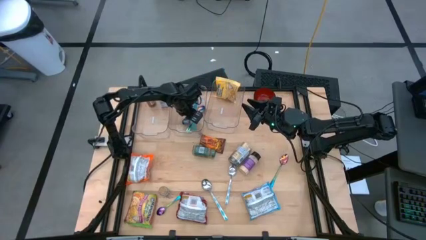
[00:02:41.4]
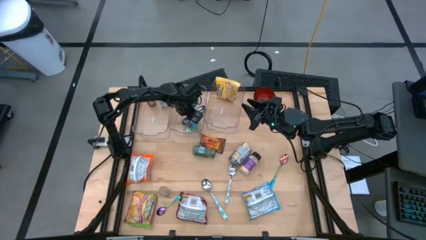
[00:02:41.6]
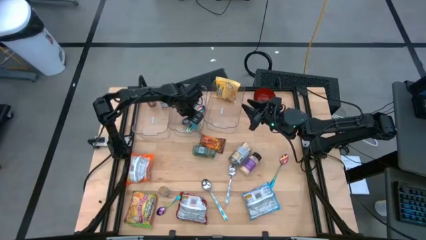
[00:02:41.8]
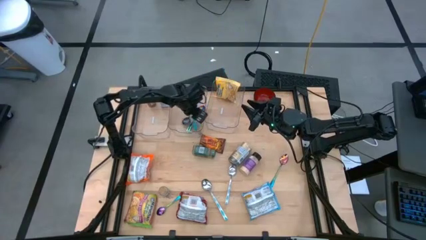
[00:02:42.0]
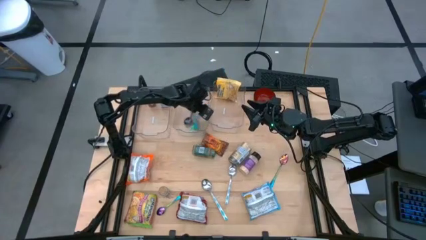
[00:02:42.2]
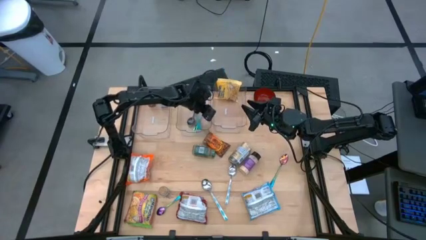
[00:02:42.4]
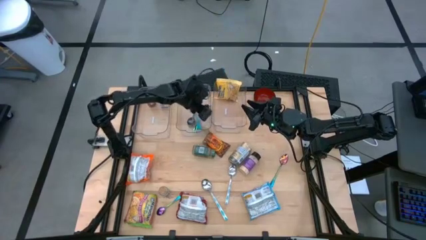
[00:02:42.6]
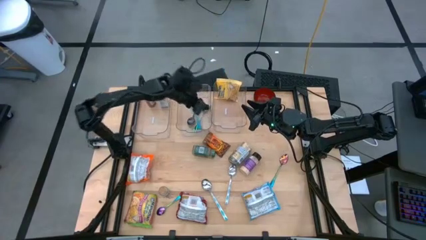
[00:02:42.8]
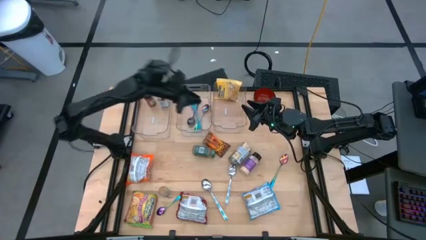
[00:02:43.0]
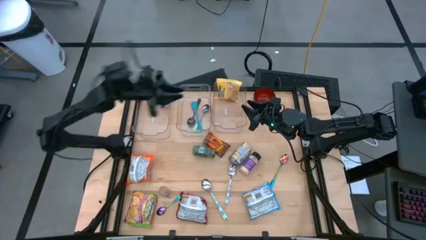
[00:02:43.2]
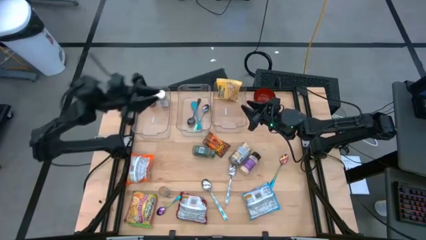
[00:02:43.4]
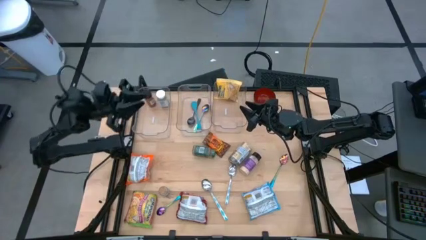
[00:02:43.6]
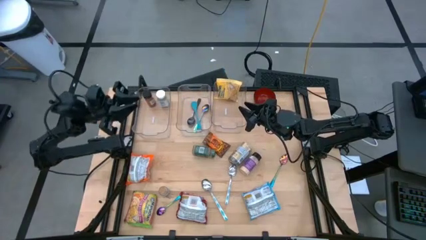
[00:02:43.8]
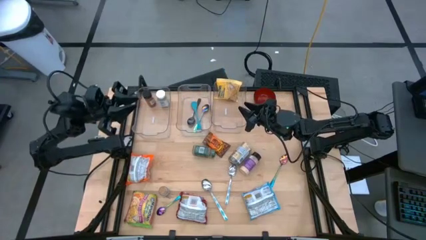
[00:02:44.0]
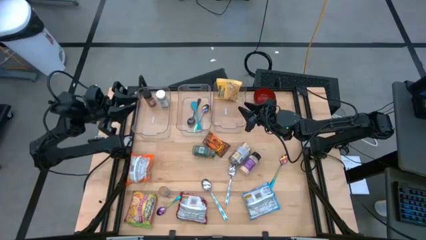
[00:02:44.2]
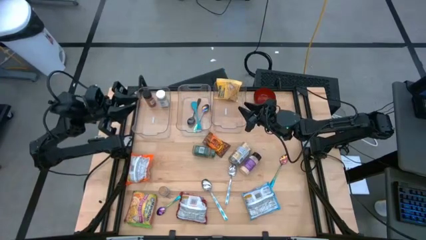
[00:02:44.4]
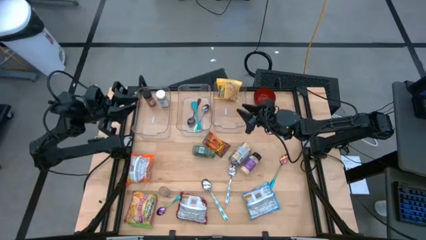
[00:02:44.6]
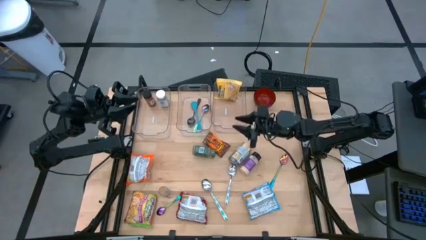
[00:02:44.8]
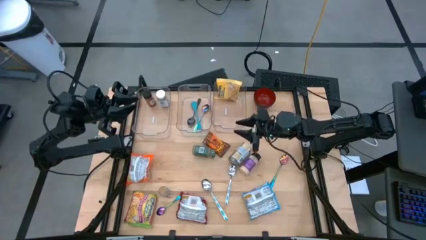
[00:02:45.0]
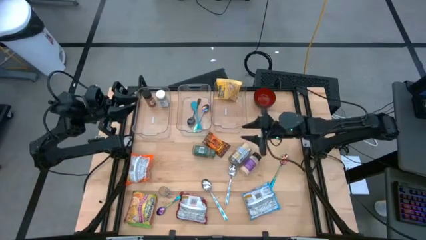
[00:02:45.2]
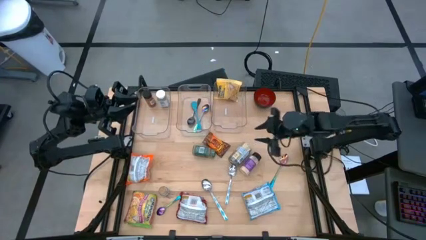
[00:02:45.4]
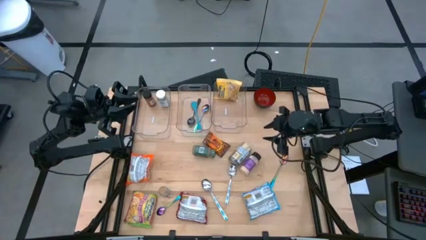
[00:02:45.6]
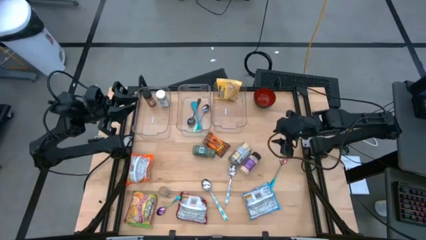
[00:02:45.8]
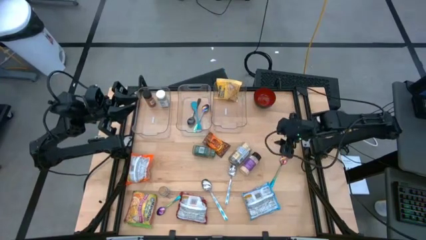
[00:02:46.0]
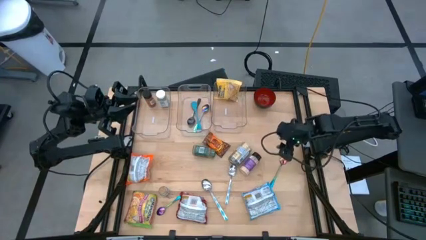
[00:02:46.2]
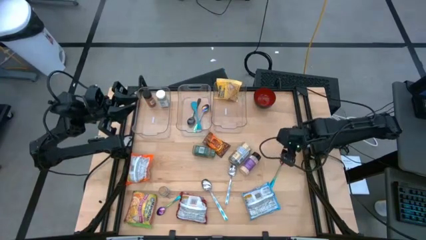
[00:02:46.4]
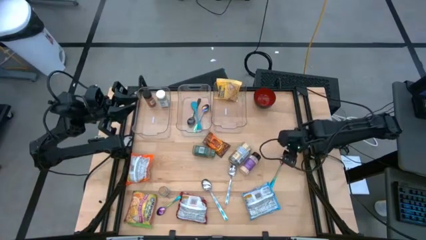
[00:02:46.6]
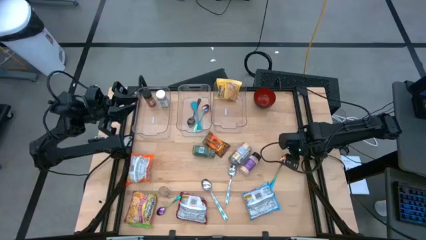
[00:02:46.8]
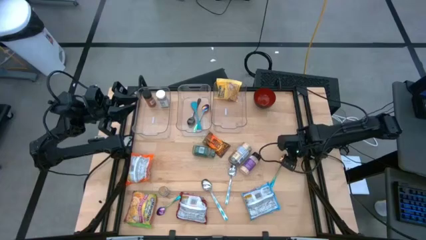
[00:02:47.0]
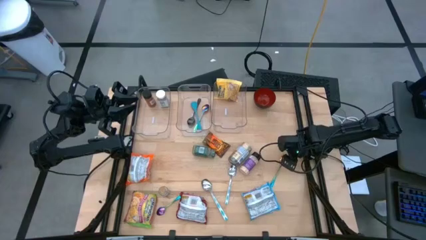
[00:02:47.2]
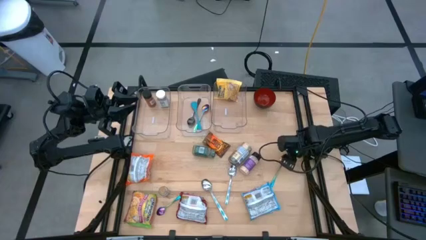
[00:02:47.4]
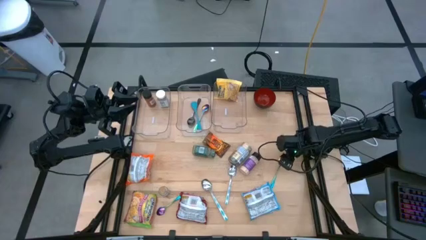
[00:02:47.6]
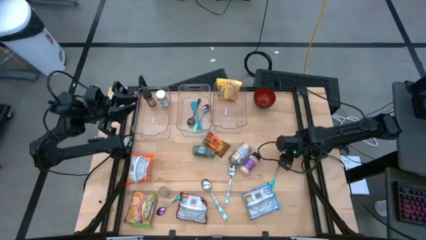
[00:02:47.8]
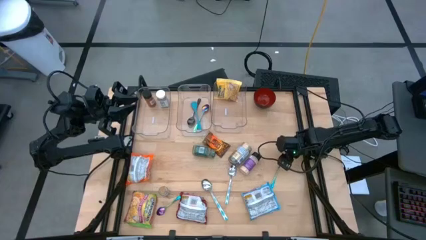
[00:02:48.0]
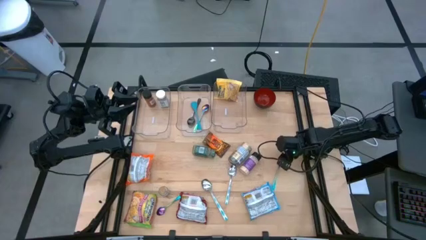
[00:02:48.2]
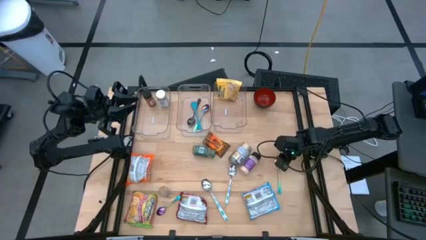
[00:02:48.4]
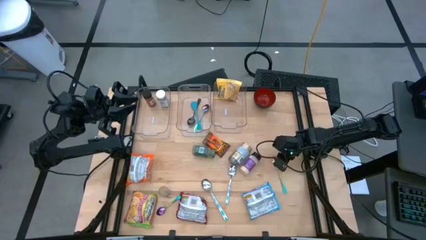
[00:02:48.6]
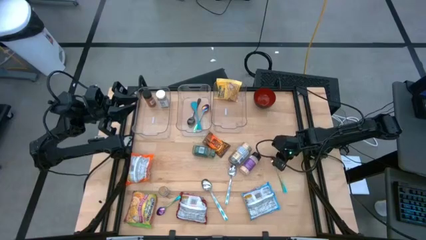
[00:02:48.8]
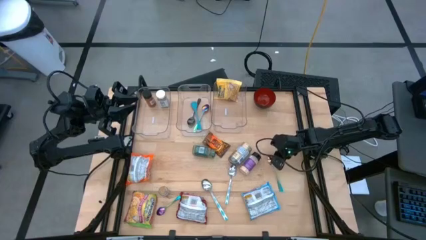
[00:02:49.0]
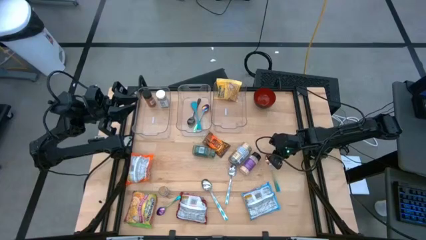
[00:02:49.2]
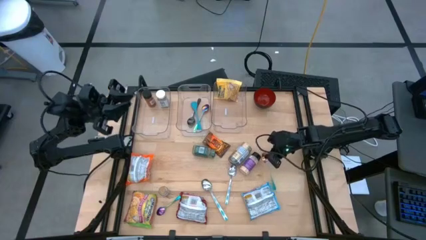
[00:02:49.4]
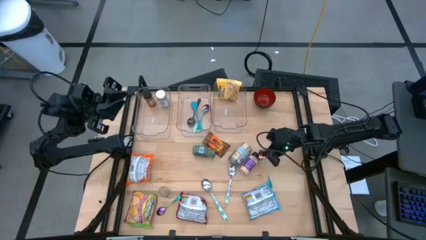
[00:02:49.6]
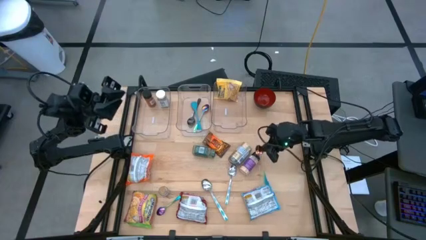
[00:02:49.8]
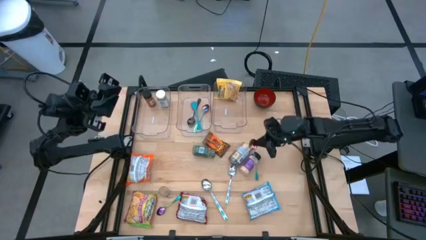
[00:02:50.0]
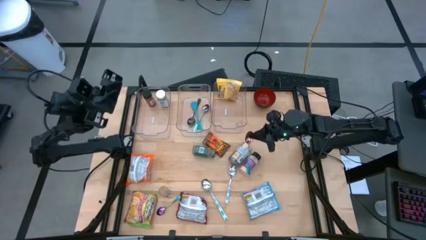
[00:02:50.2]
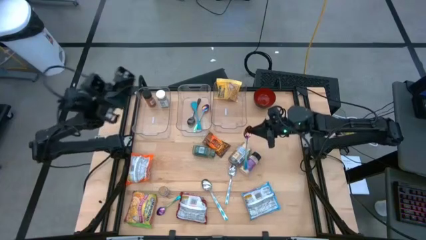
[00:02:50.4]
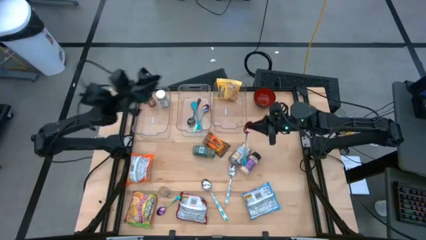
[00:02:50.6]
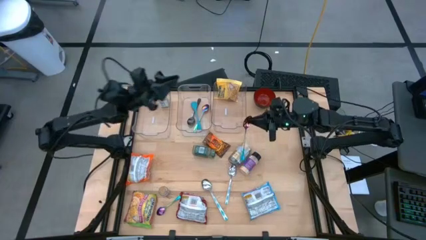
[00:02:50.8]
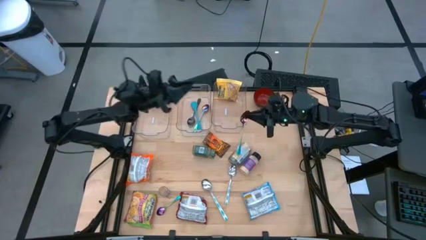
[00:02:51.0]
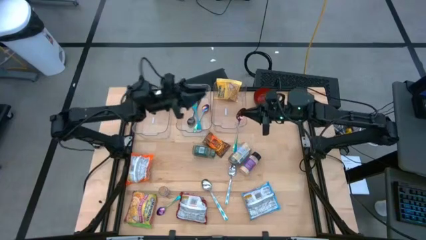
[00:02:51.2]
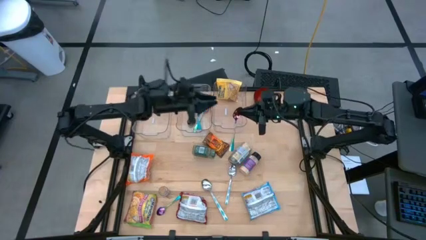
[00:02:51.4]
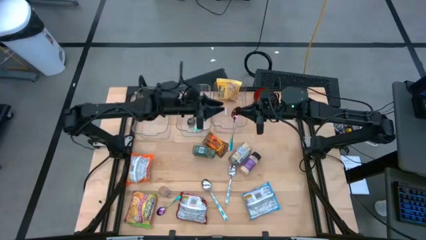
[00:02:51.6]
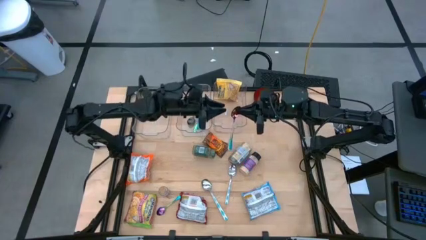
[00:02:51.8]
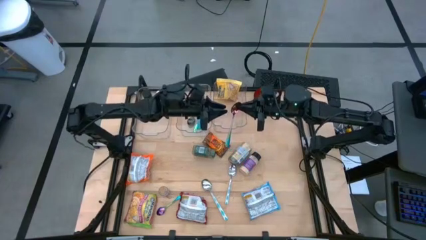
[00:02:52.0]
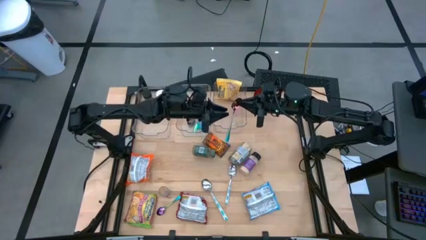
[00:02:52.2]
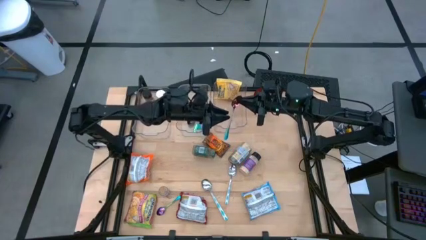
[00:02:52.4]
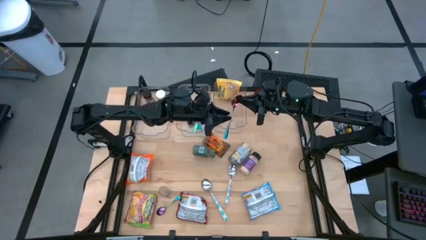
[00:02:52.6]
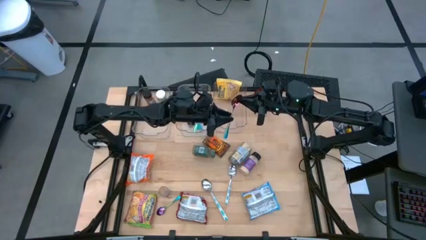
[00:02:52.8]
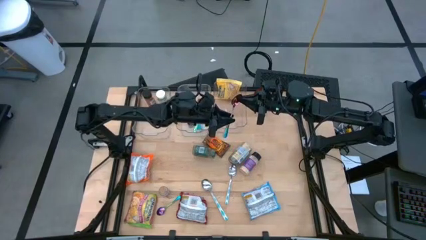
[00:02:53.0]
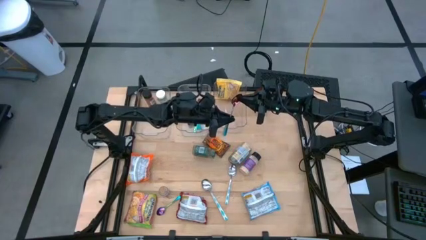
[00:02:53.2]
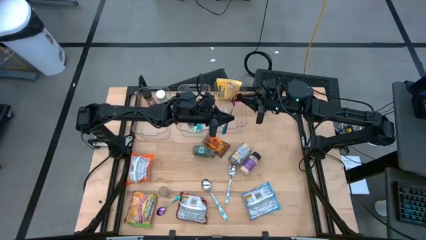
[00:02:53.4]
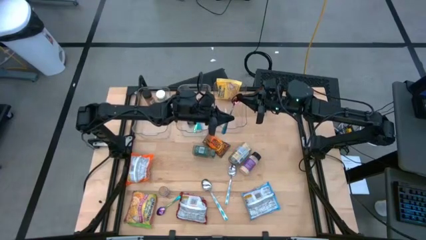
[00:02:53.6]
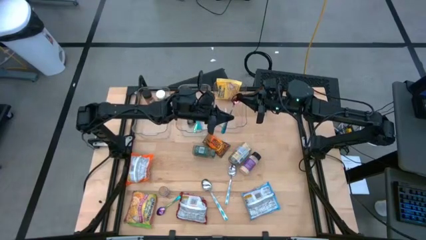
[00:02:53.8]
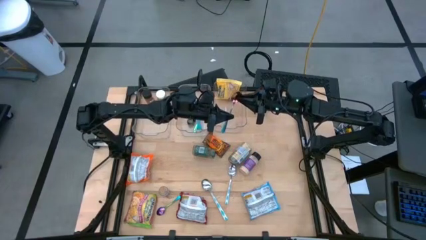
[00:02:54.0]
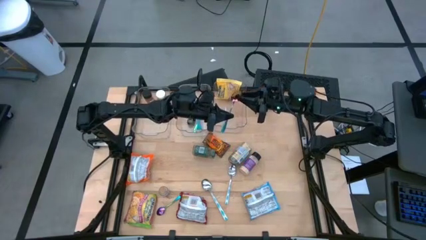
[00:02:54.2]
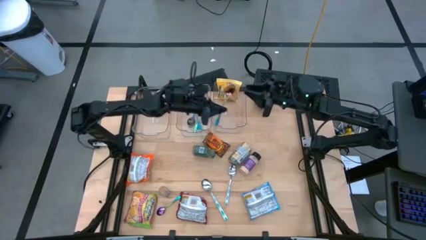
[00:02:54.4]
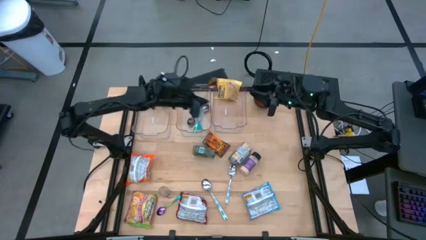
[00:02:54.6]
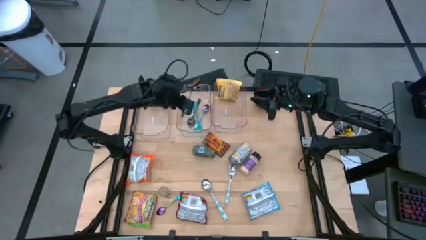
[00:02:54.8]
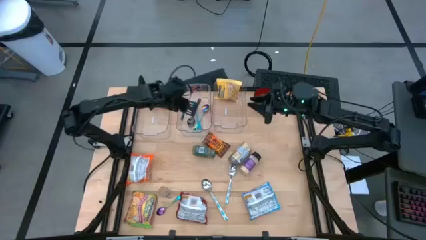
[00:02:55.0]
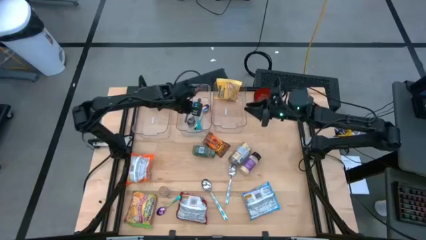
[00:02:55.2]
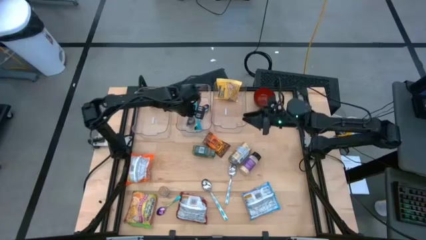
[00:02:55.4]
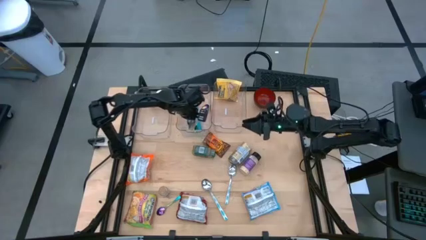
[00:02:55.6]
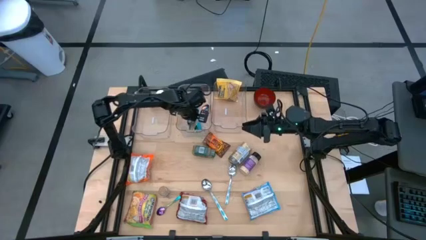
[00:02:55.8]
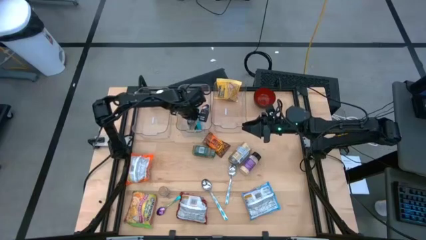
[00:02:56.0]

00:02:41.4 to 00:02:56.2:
Task: Pick & Place Food Item
Put the top purple and blue spoon into the middle transparent bin
